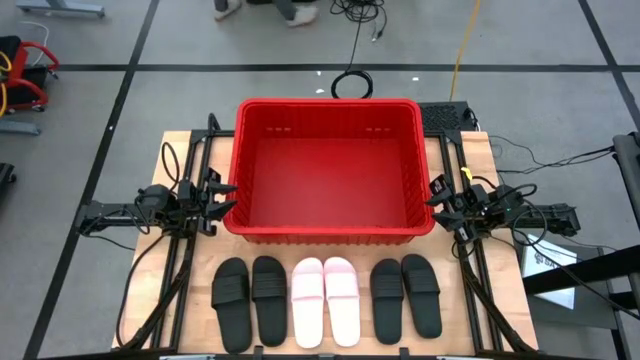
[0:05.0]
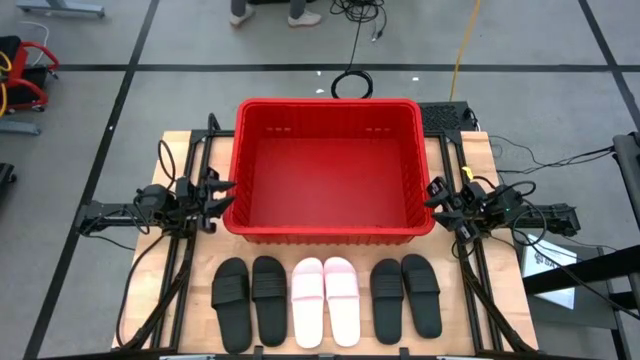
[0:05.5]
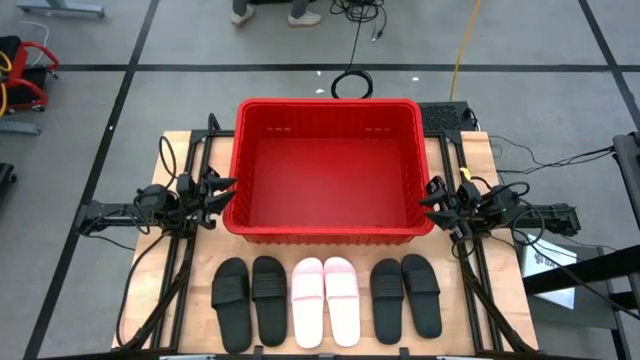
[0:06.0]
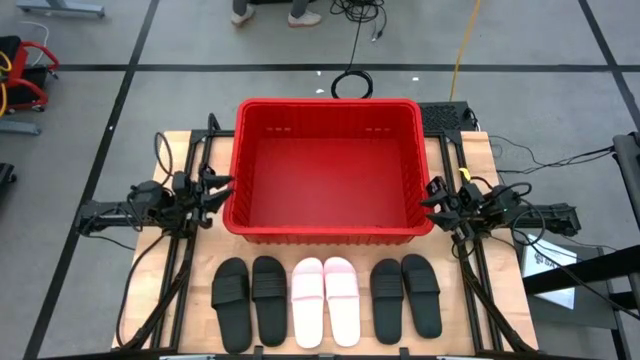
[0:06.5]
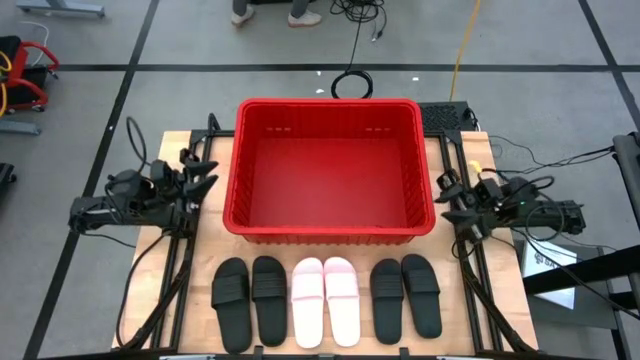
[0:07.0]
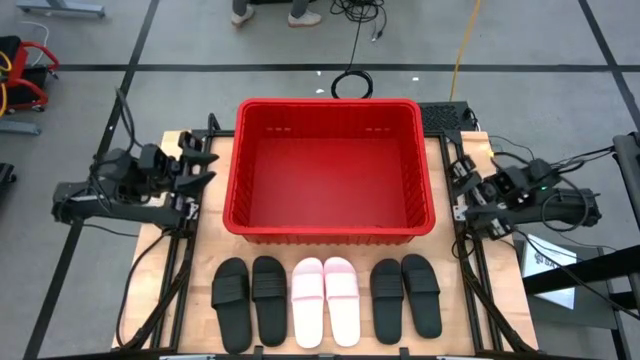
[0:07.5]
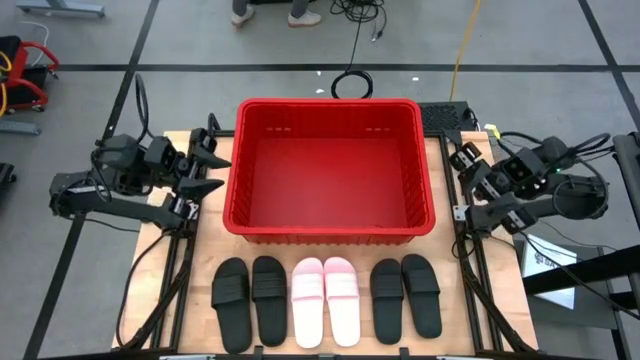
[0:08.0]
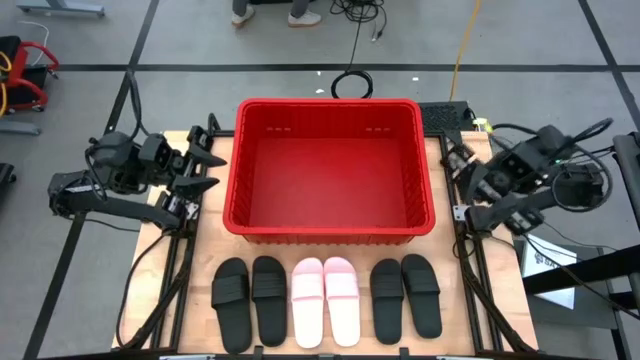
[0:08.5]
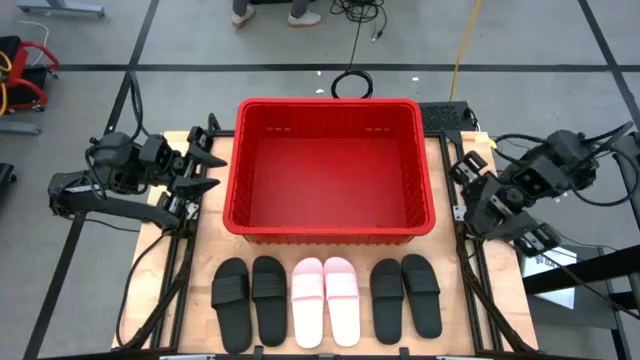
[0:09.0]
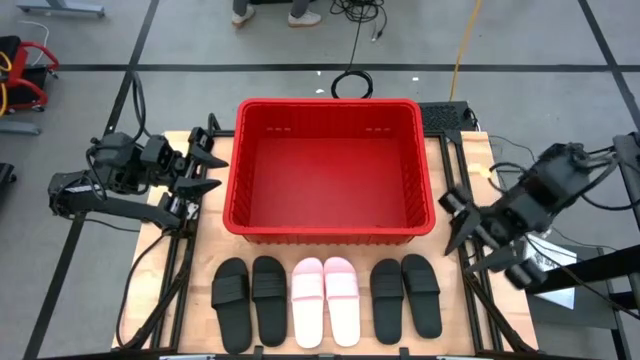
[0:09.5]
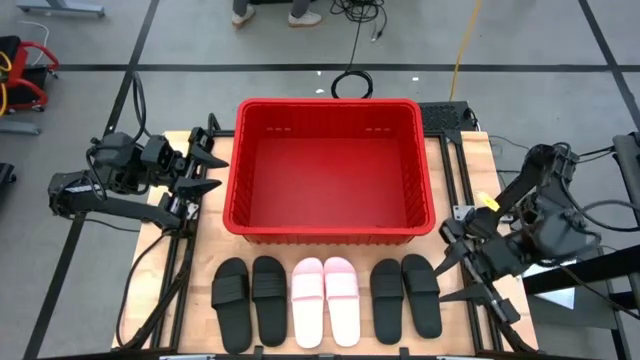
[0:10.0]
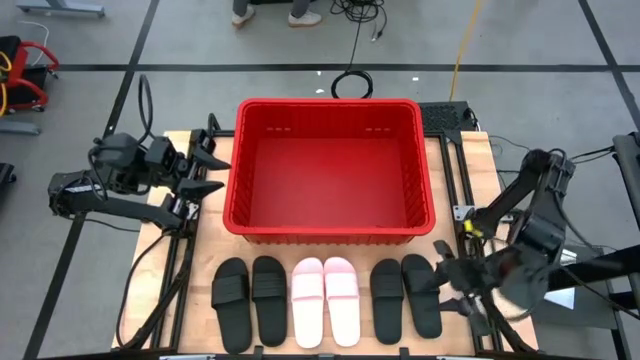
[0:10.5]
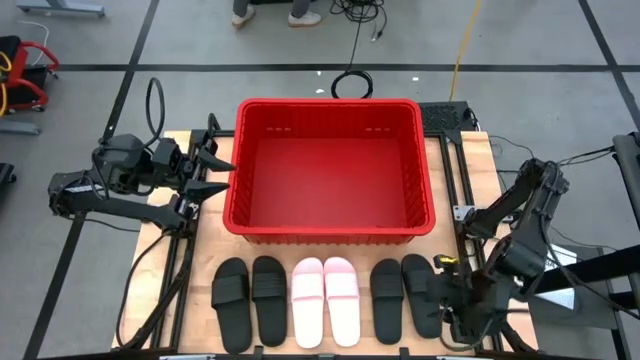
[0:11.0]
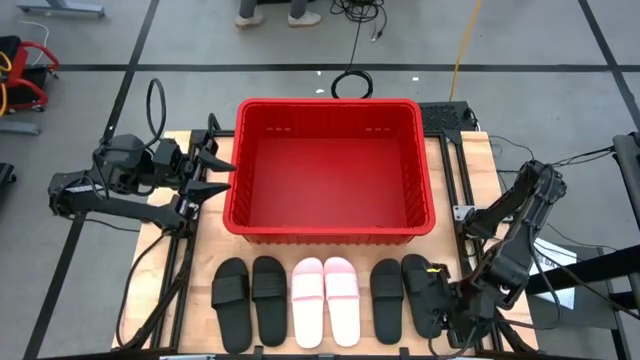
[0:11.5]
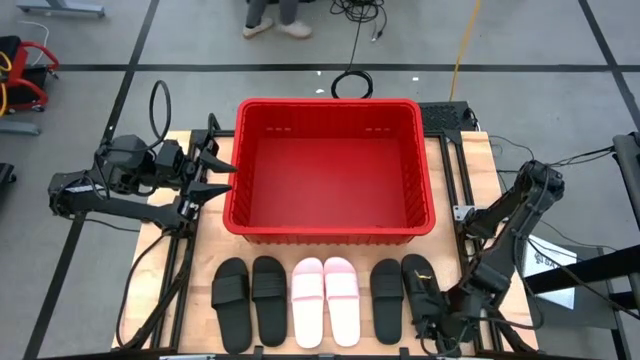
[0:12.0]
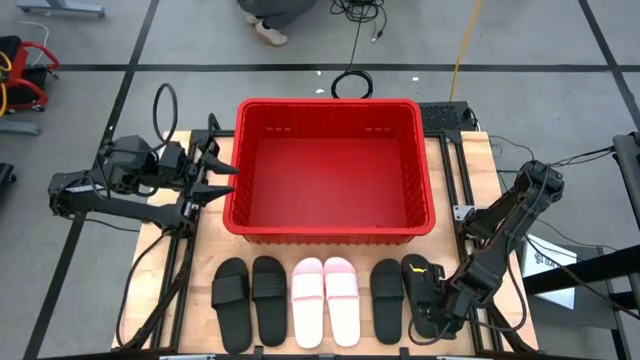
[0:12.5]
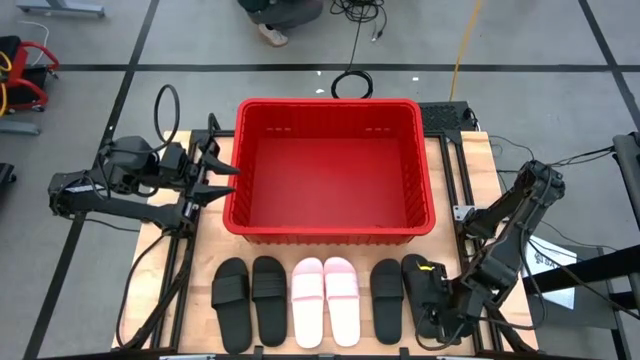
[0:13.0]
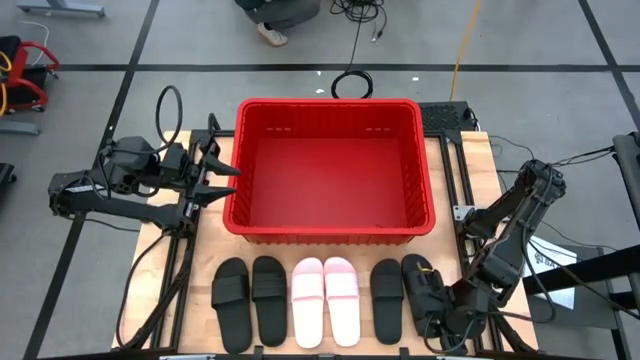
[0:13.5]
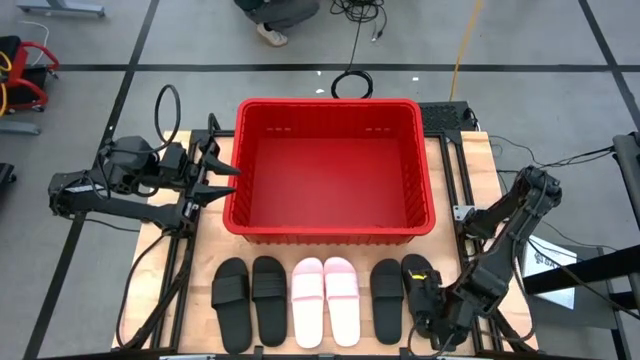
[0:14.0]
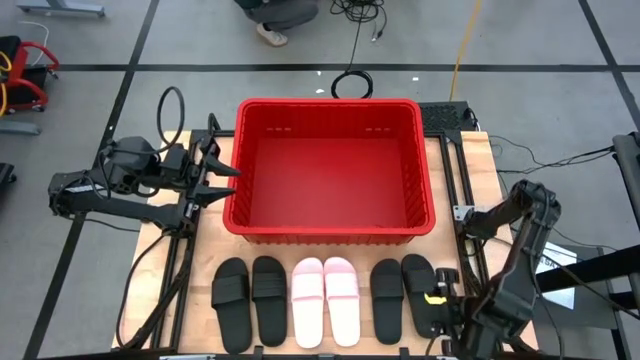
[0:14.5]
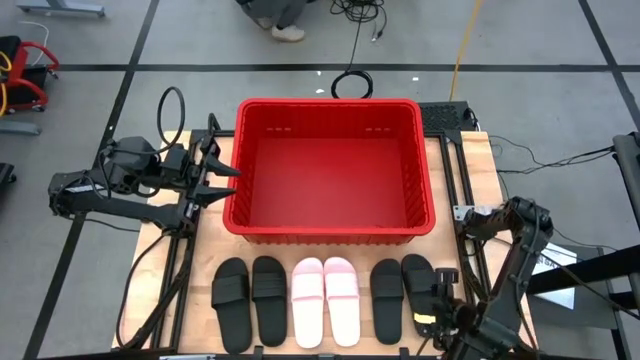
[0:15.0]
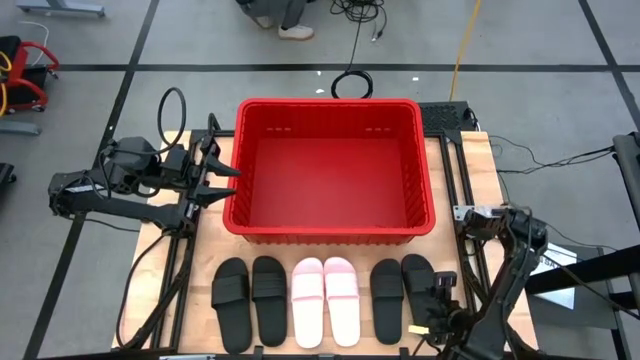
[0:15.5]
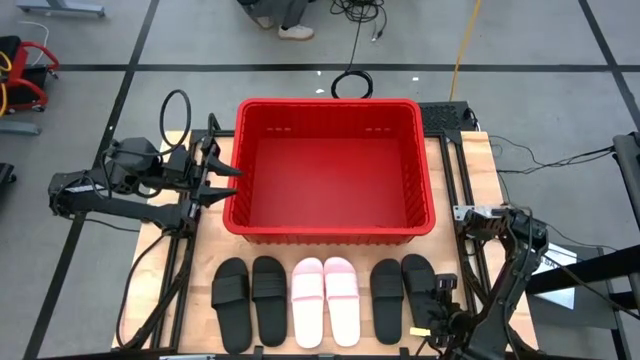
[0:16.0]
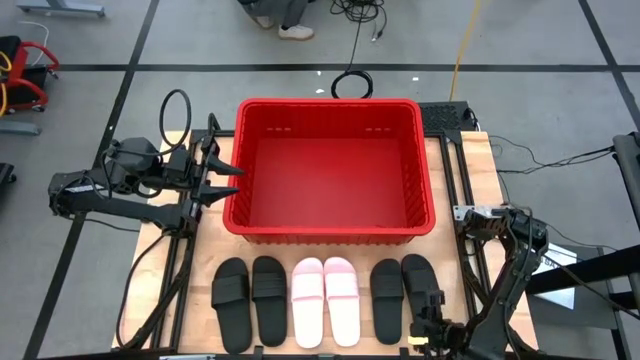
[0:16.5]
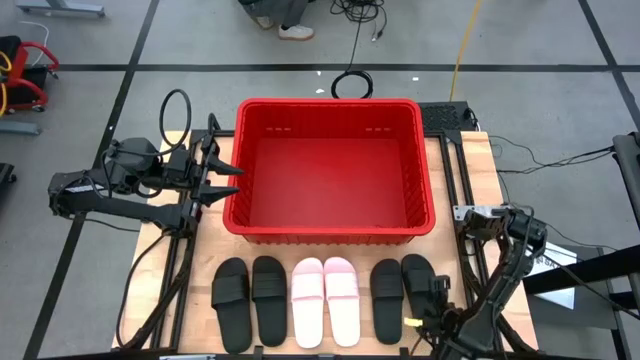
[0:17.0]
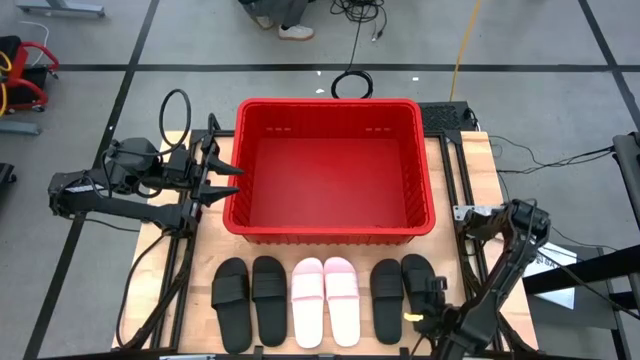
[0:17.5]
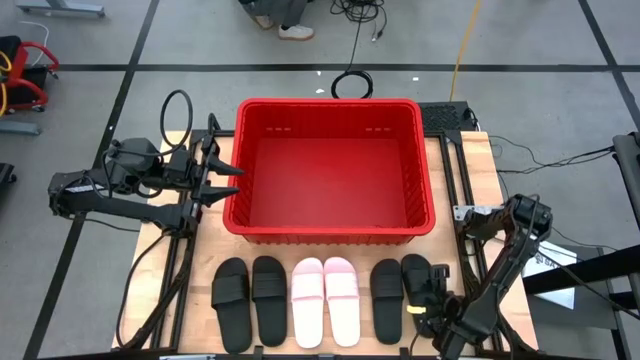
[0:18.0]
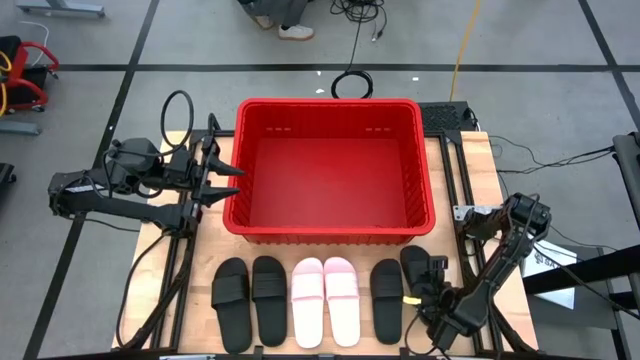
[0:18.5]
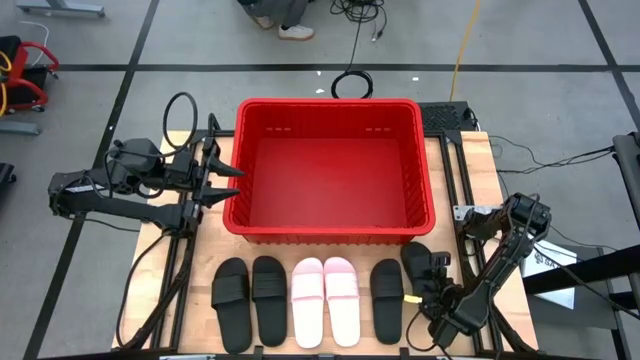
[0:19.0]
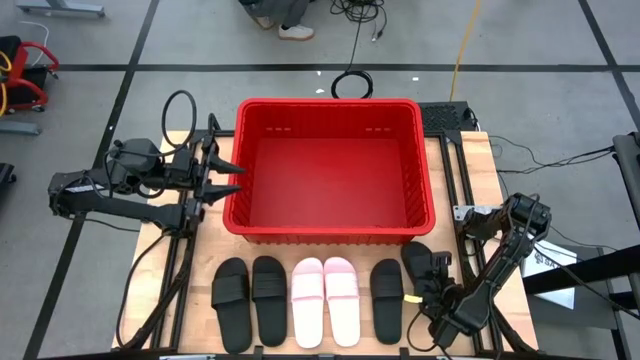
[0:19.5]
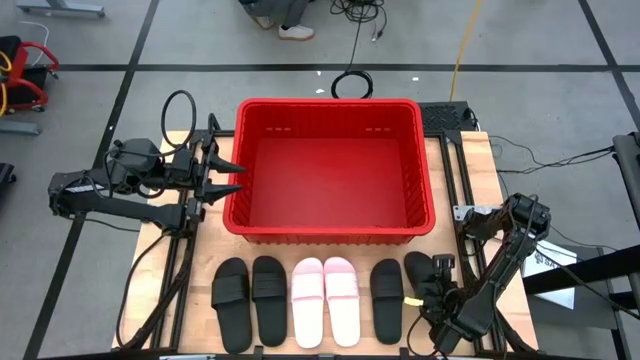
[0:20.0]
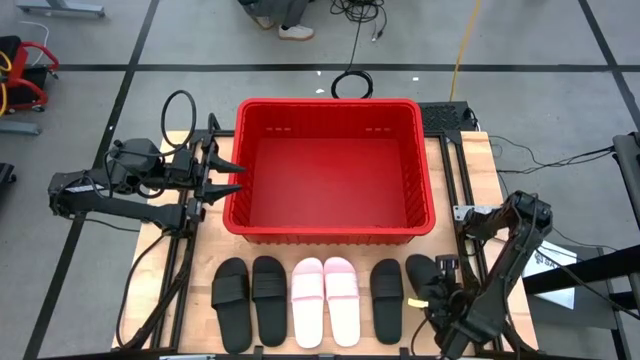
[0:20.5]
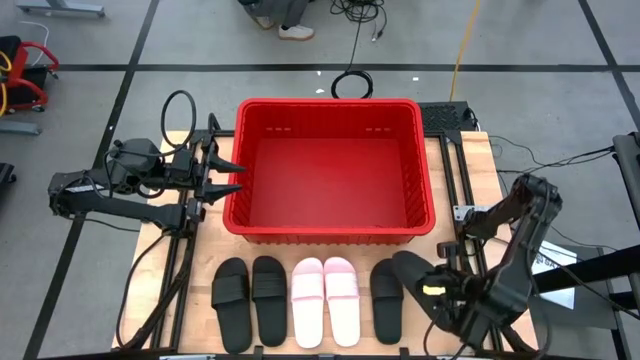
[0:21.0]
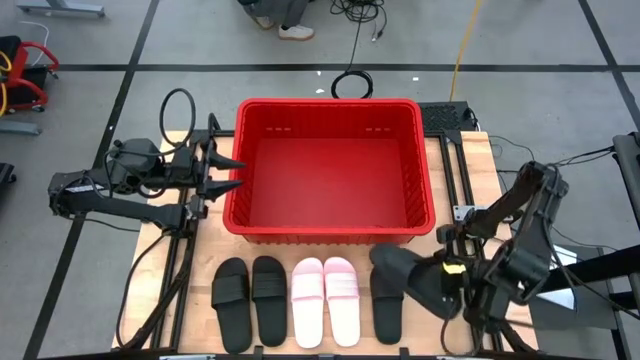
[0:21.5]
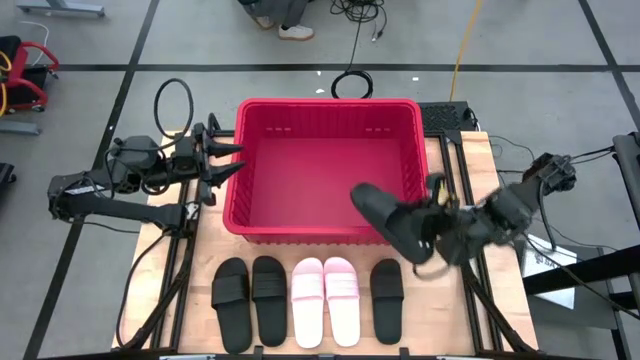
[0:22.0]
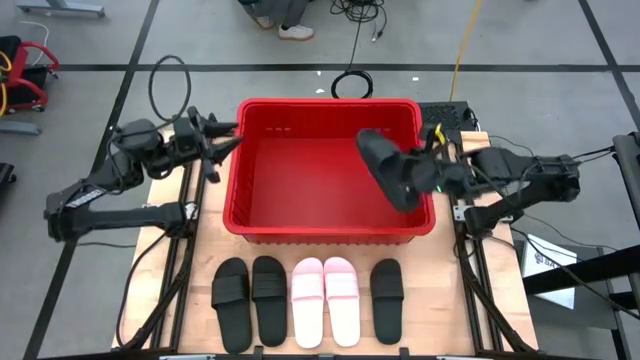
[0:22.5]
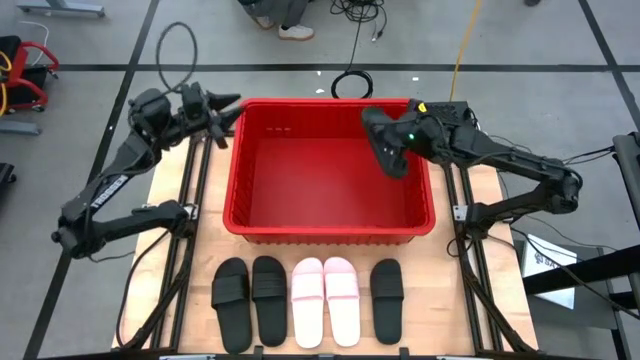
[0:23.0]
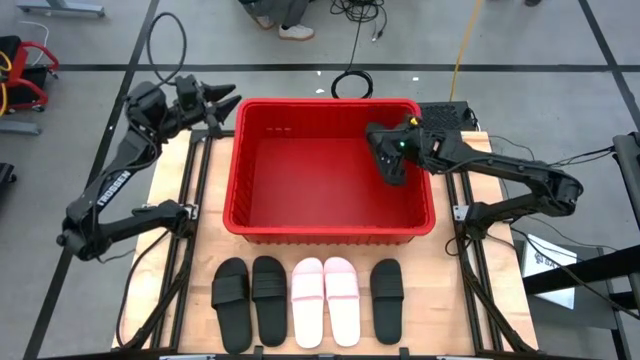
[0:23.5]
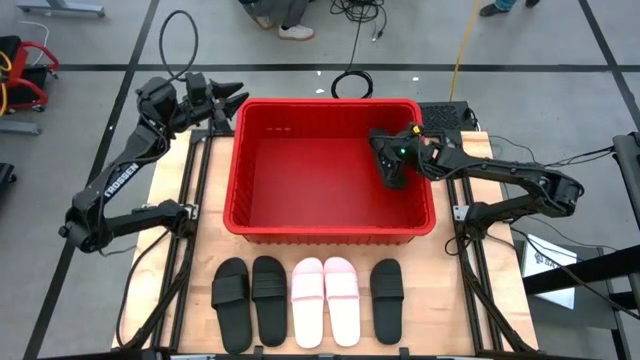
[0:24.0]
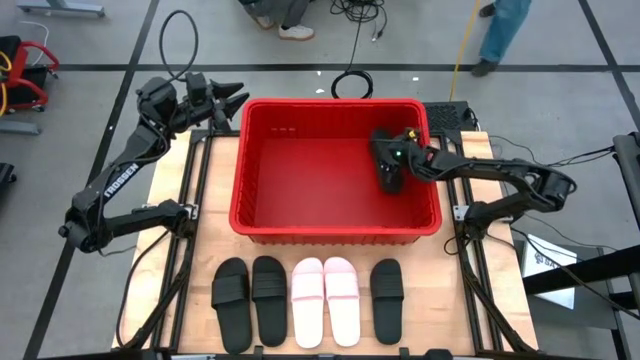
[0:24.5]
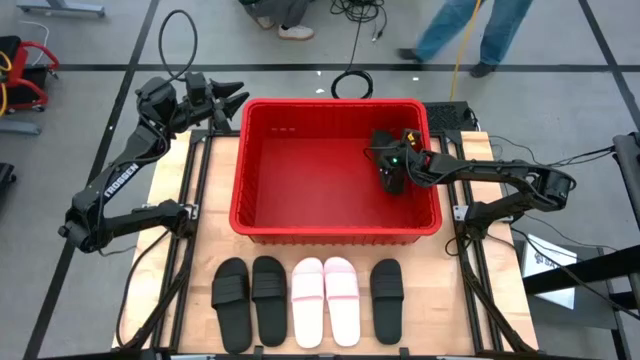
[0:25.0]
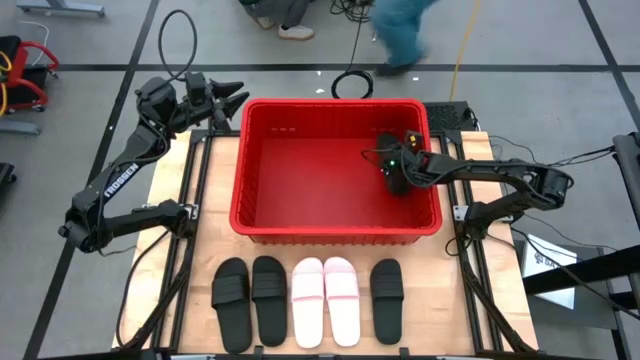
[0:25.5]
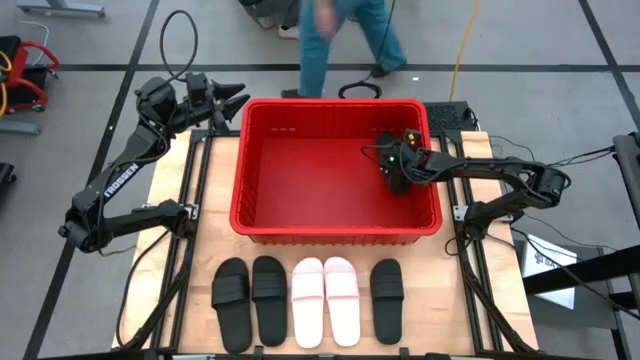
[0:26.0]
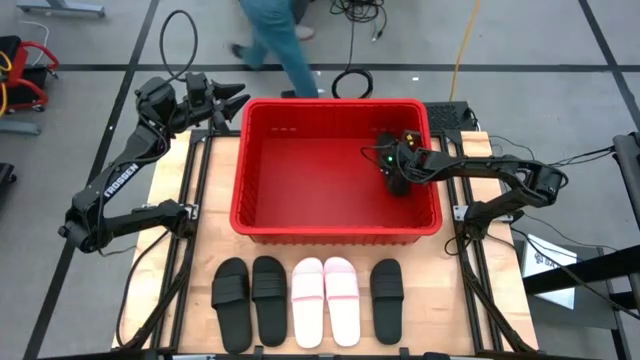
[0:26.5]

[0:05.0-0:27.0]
Task: Pick and place slides into bin
Put the black slide into the bin
